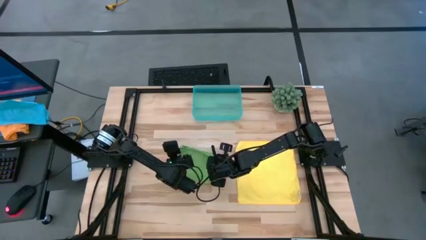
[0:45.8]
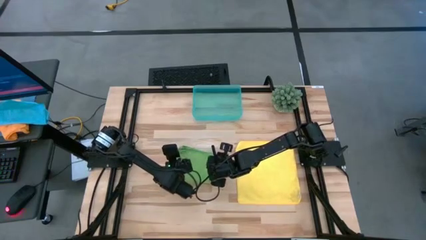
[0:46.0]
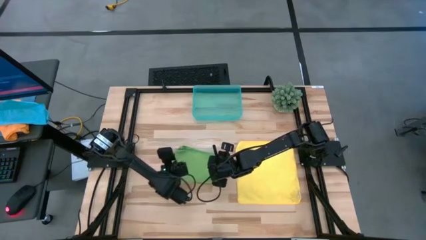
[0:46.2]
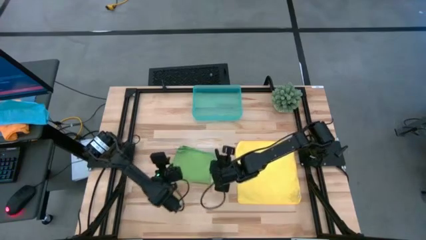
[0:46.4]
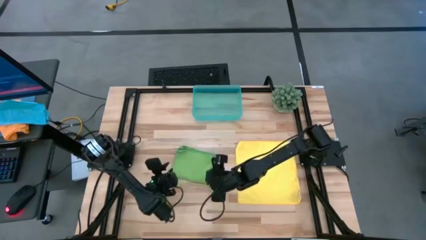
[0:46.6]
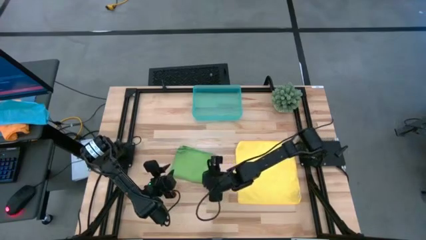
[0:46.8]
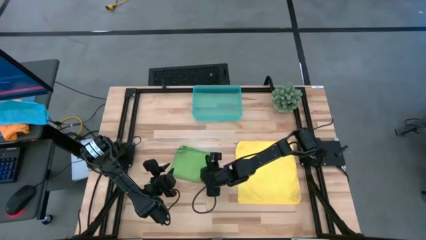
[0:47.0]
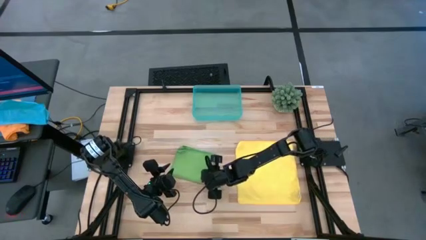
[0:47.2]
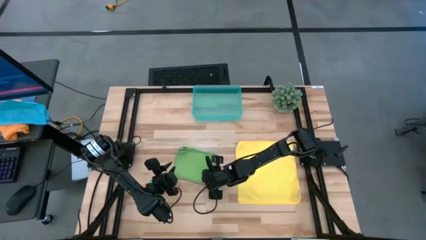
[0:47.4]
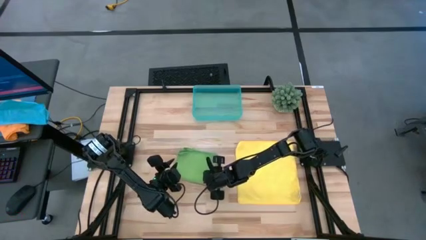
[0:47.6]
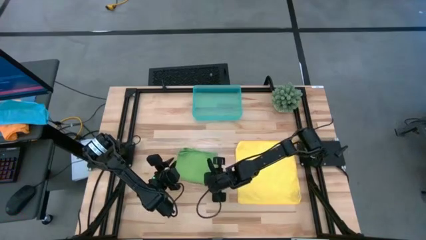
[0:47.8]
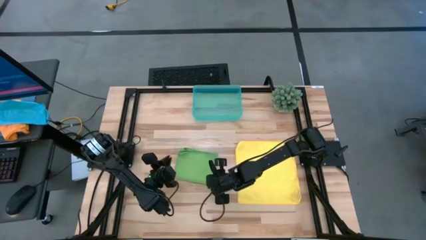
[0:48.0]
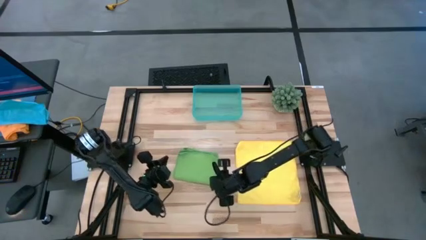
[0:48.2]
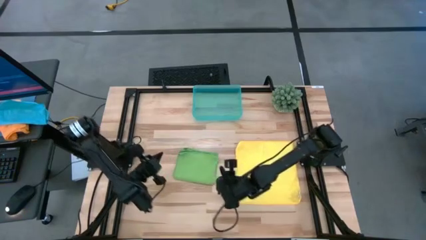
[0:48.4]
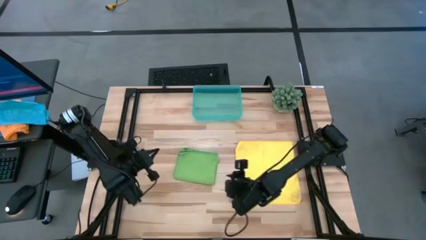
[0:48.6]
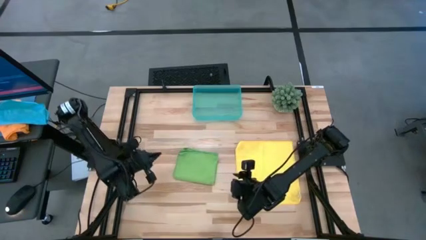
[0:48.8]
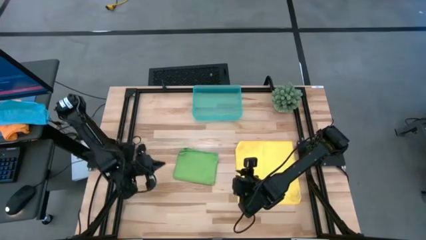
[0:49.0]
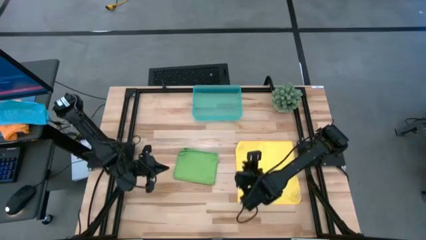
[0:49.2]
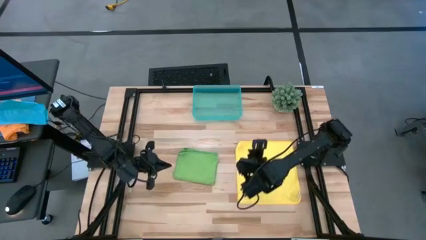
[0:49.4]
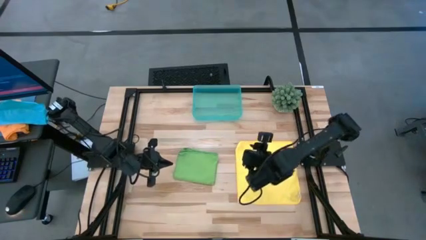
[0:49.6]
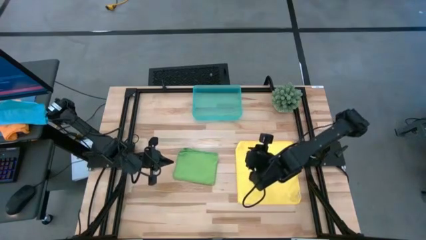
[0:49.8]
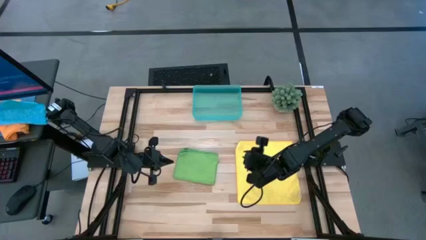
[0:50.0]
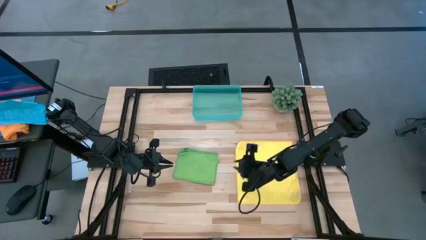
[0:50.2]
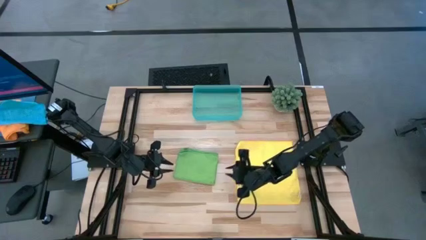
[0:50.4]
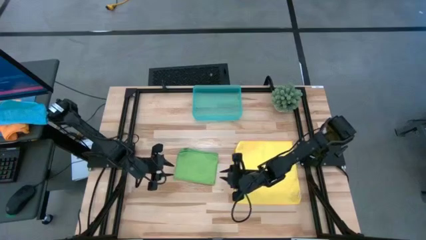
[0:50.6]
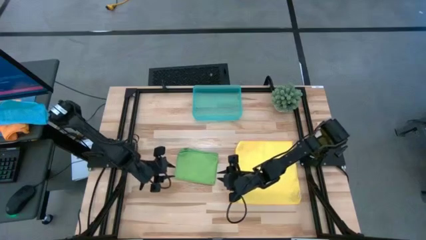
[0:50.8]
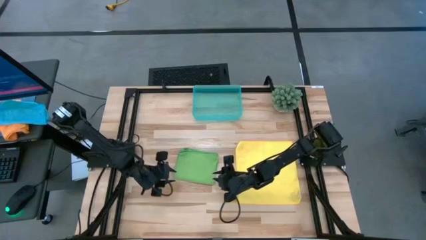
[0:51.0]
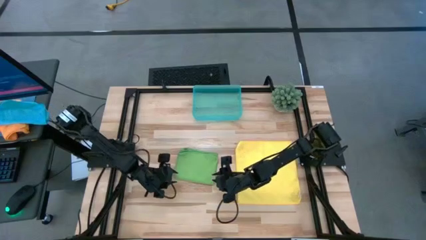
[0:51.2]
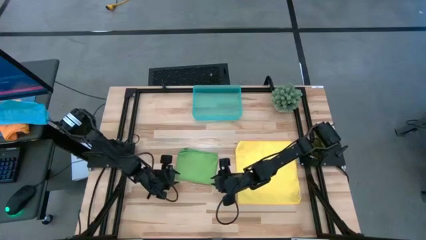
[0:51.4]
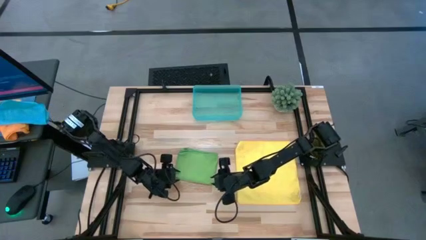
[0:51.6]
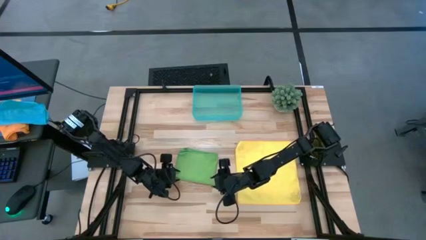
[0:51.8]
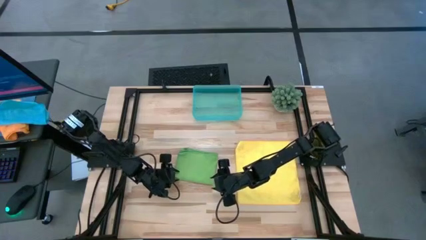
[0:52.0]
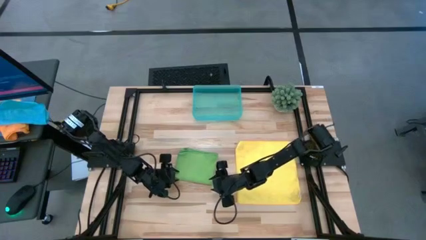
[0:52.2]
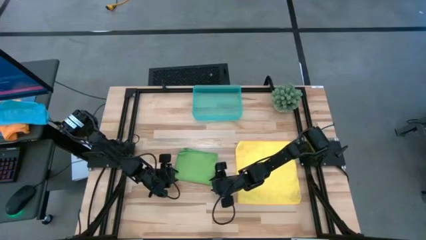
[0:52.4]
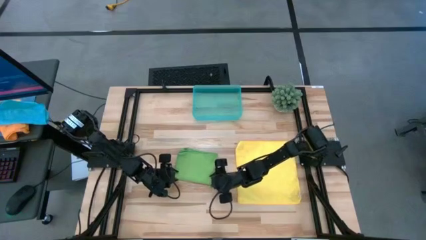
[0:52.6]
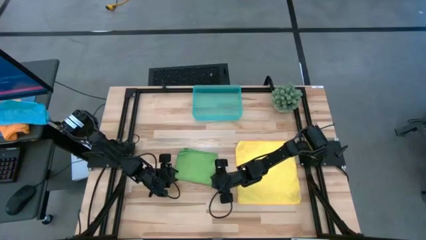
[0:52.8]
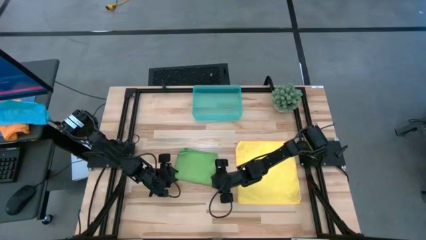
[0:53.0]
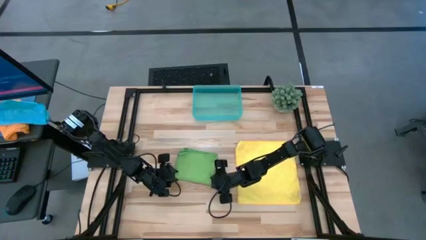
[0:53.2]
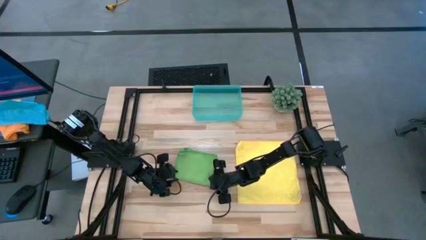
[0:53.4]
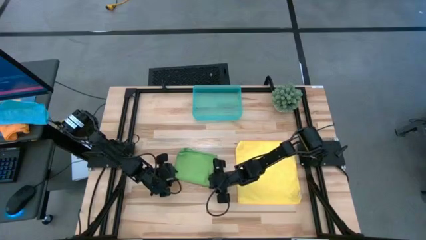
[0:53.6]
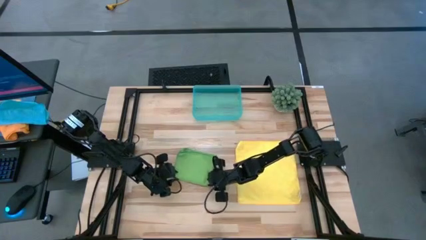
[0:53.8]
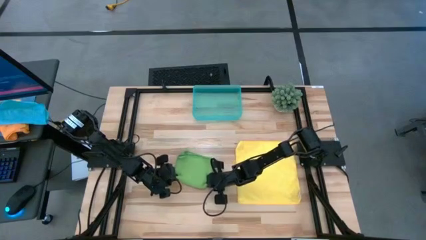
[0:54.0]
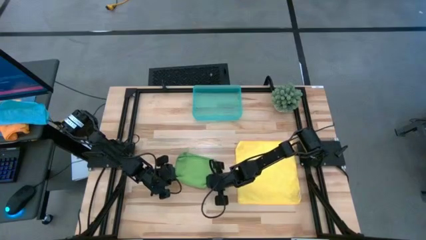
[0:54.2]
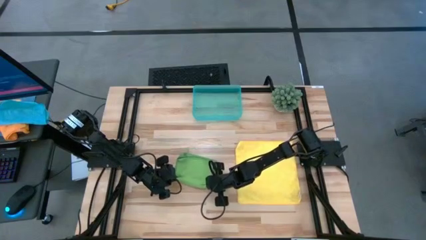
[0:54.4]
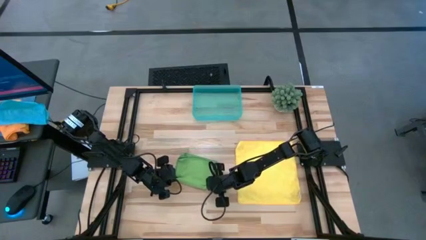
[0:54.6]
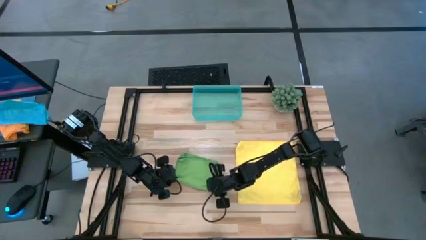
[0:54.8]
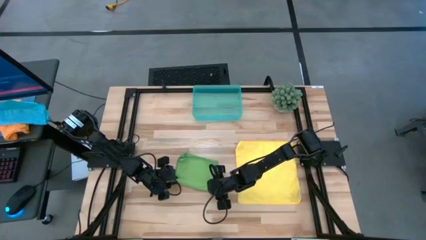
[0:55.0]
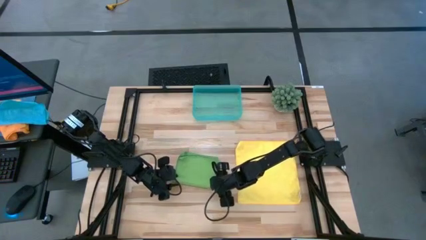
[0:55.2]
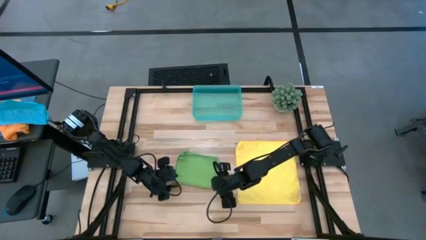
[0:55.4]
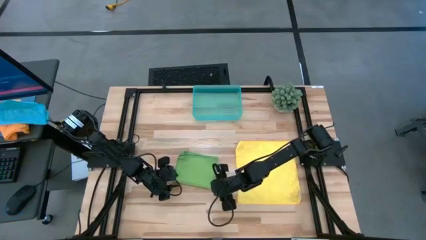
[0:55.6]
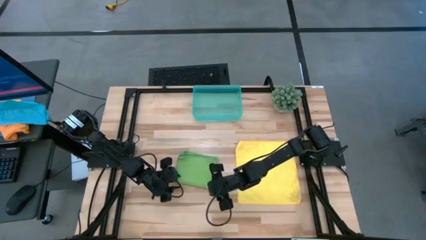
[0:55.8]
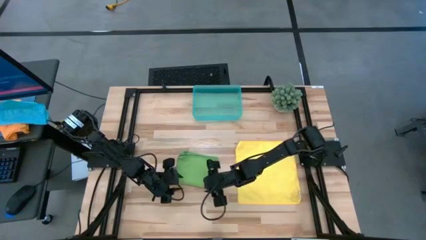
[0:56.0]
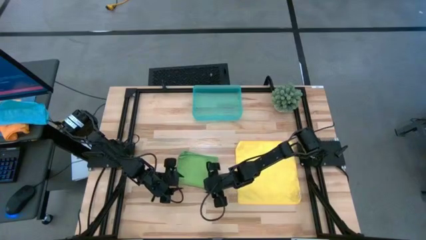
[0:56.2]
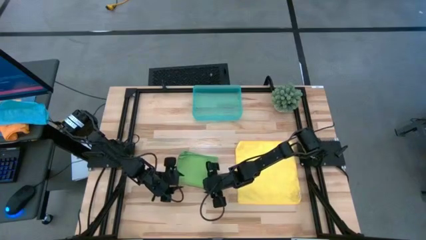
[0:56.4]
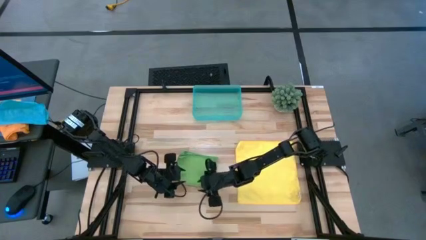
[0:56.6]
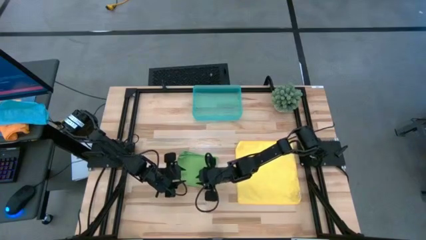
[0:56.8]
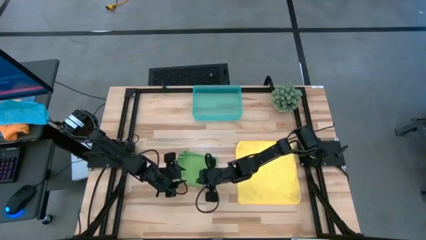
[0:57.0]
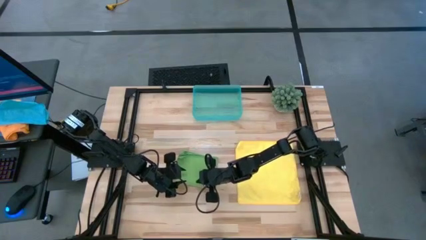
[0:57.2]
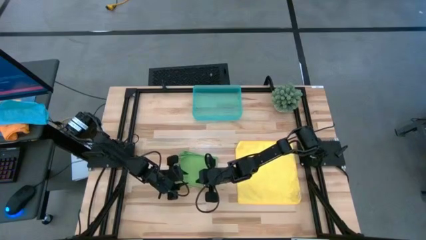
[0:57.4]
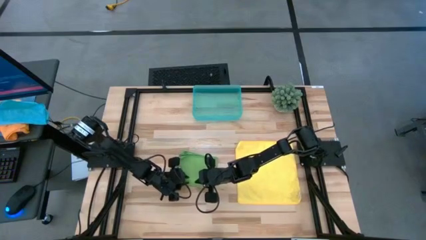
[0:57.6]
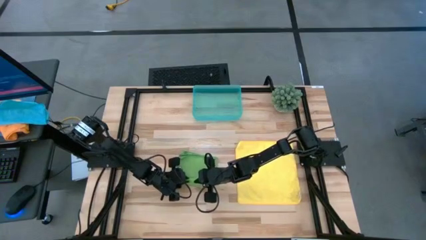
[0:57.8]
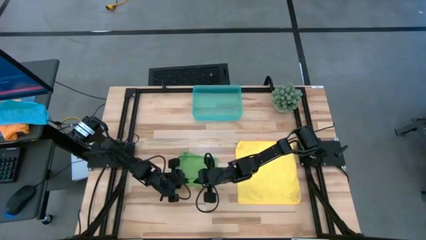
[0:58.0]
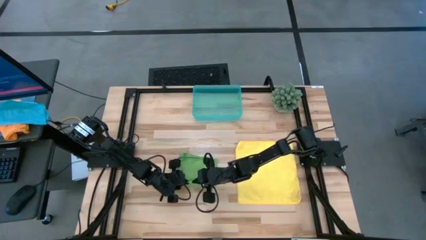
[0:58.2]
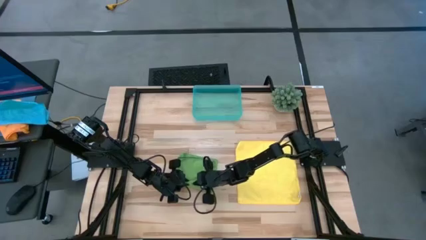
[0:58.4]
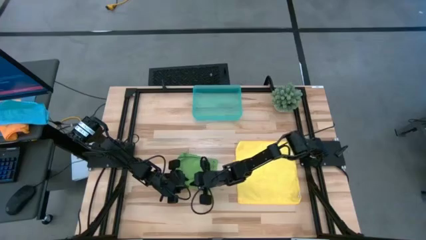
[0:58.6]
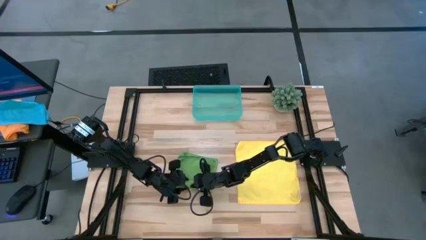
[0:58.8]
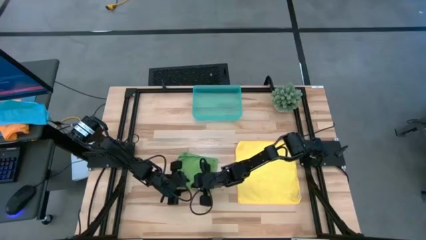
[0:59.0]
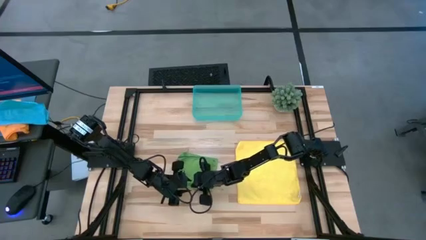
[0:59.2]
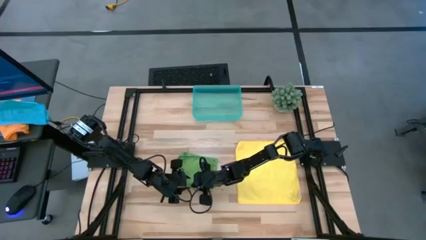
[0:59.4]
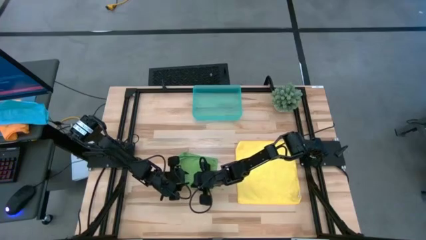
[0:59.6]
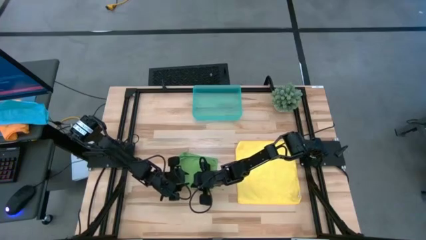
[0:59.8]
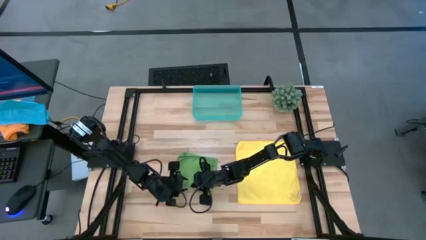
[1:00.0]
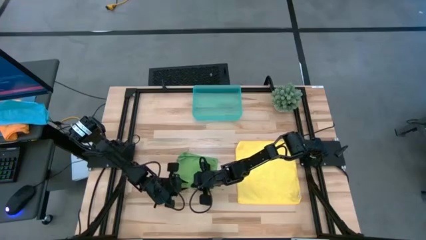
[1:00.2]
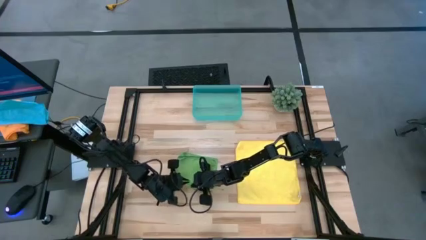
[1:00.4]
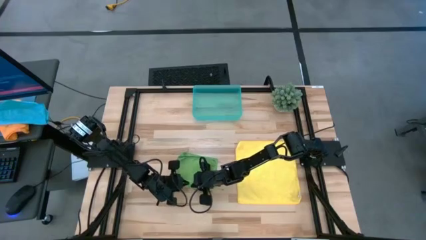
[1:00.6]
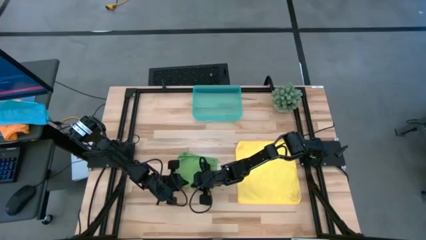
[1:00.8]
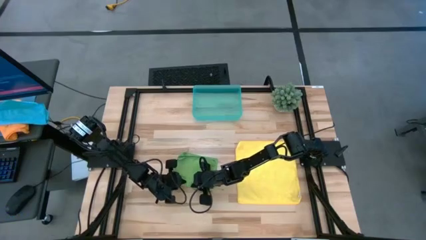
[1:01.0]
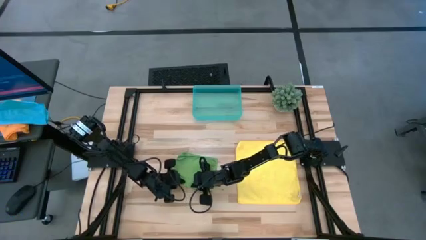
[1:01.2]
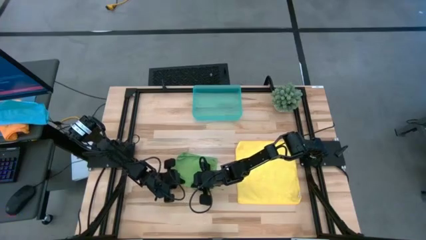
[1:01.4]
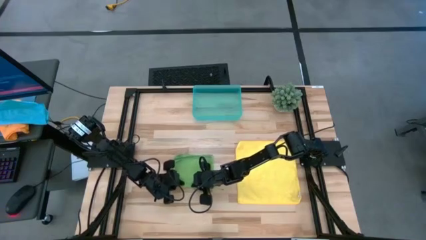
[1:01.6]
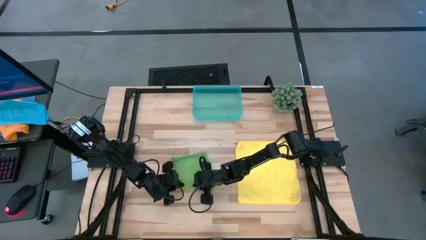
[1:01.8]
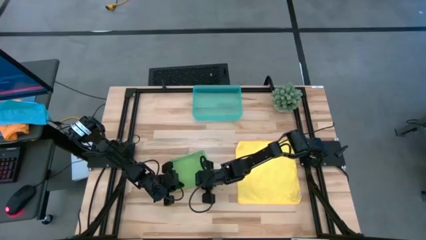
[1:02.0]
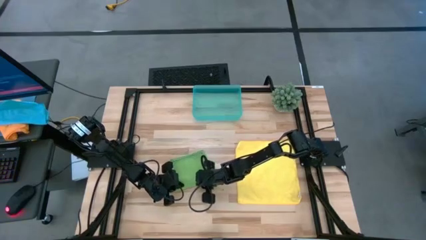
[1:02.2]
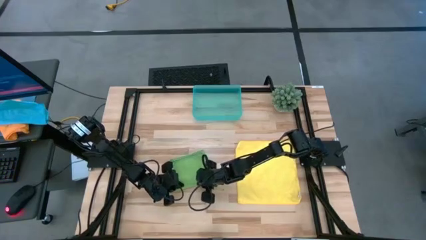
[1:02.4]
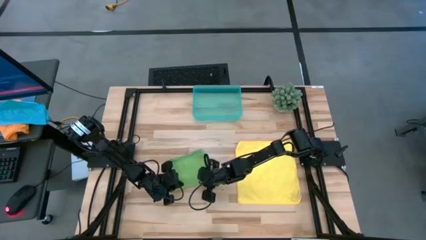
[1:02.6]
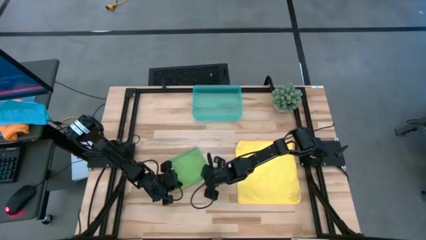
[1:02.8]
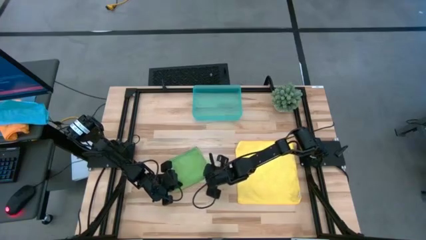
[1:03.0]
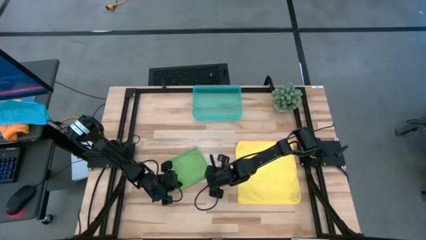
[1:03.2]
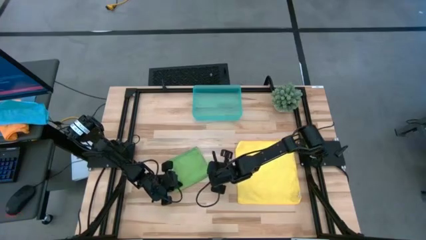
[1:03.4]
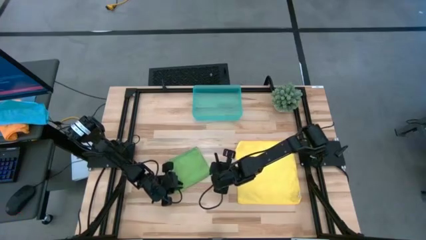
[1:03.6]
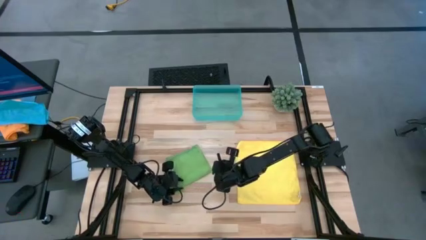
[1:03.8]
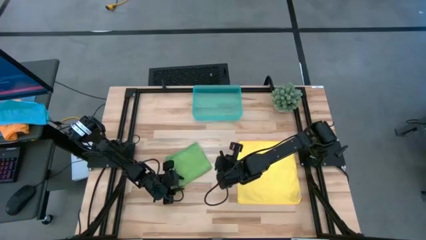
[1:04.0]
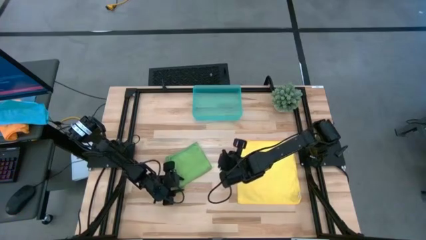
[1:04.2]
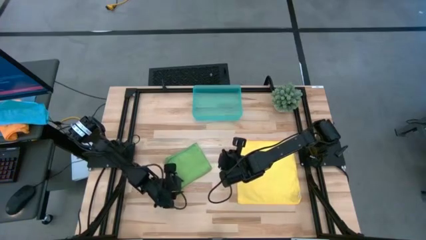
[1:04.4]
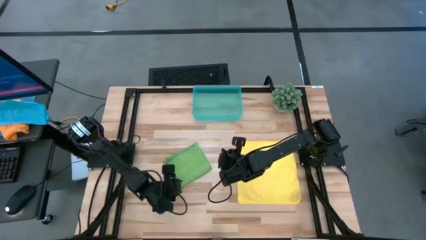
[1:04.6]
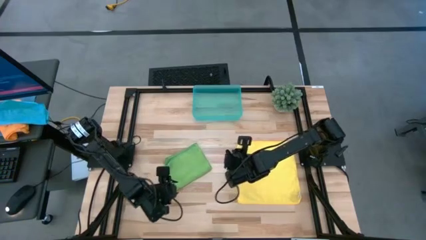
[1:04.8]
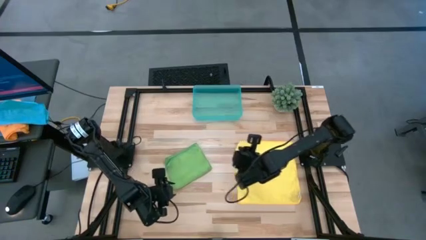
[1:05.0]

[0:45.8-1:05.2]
Task: Roll microfiber towels into tight, uniform cylinder then place into a basket
Roll the green towel
